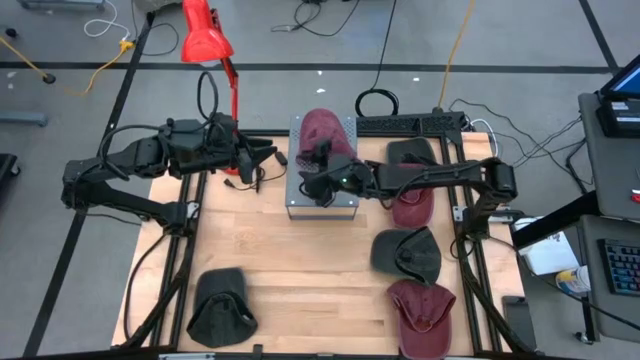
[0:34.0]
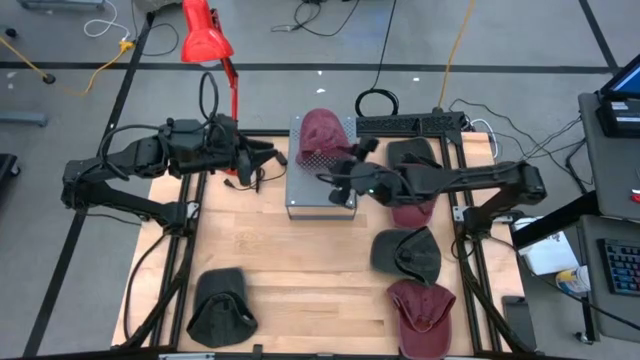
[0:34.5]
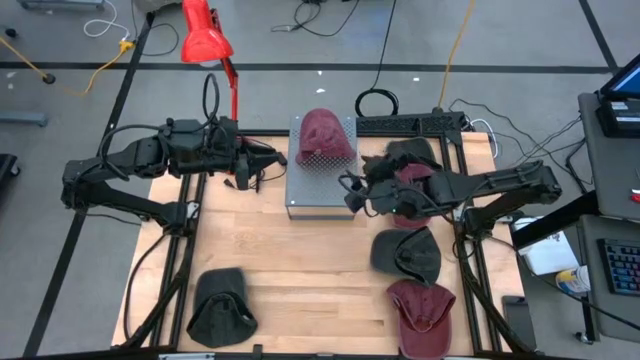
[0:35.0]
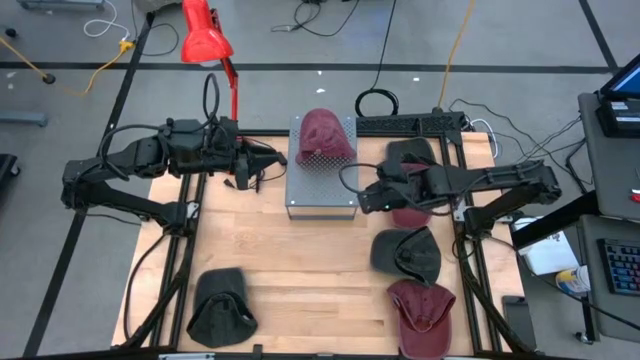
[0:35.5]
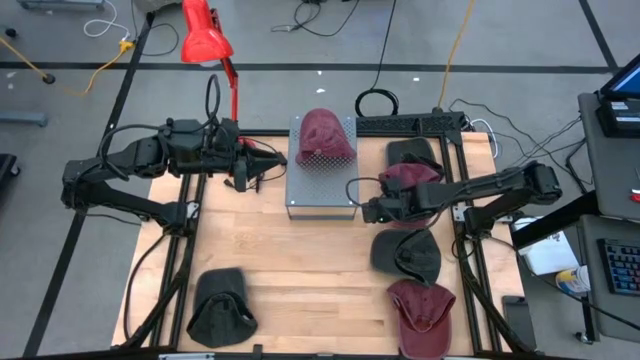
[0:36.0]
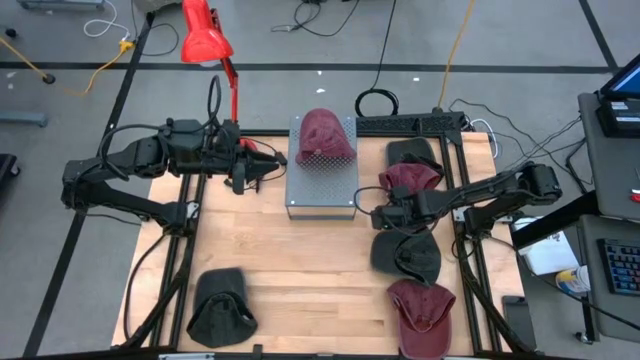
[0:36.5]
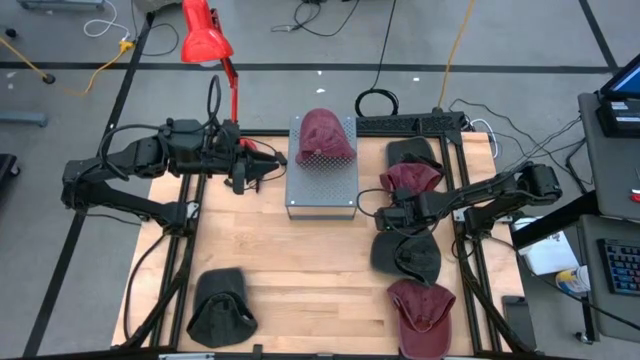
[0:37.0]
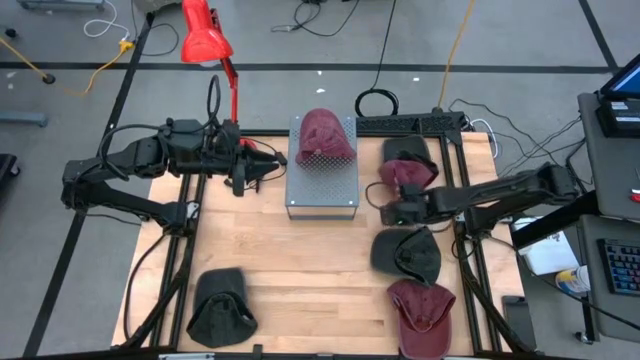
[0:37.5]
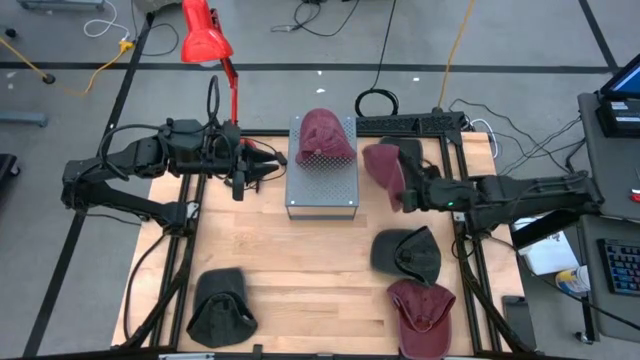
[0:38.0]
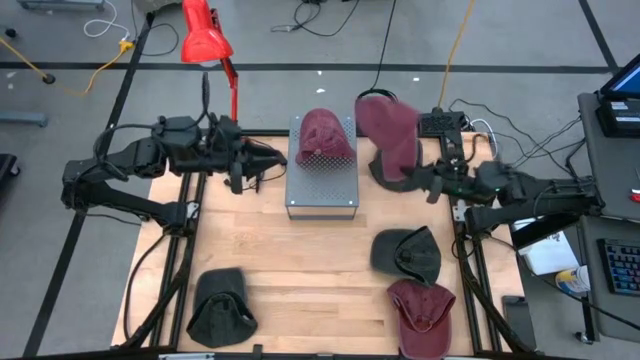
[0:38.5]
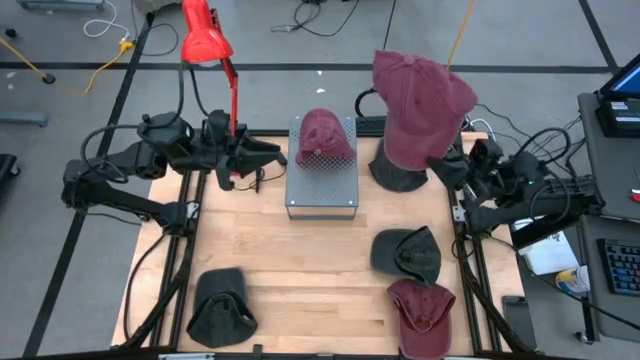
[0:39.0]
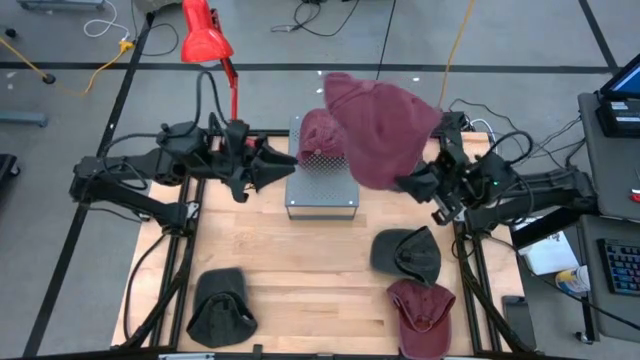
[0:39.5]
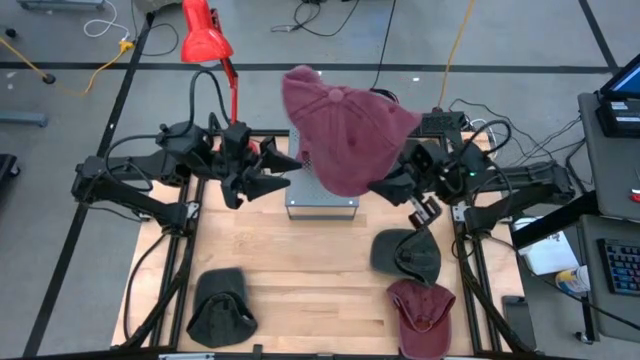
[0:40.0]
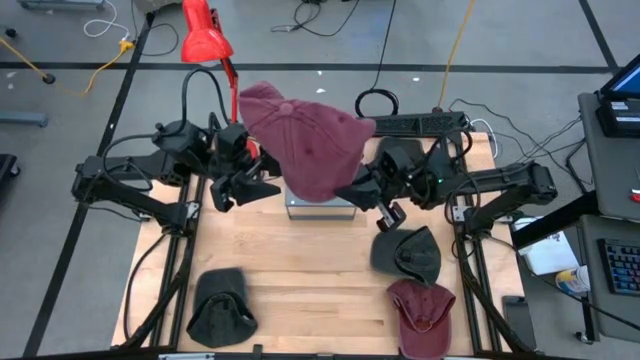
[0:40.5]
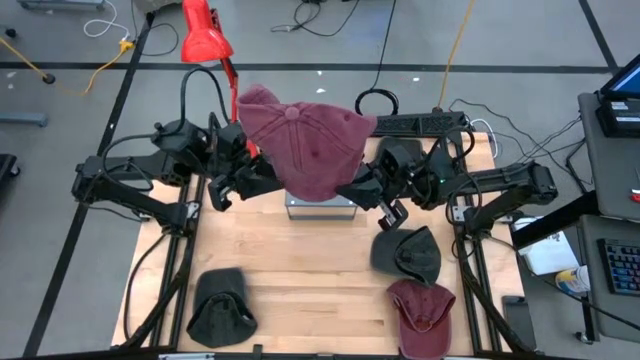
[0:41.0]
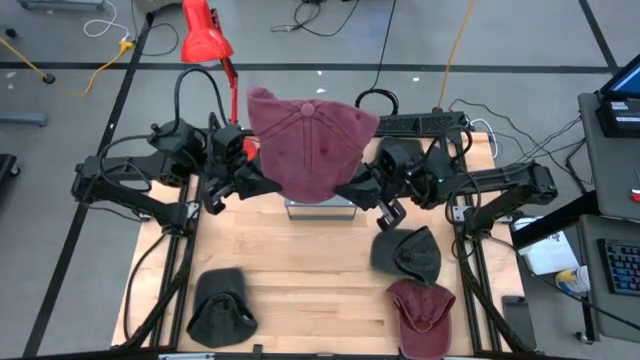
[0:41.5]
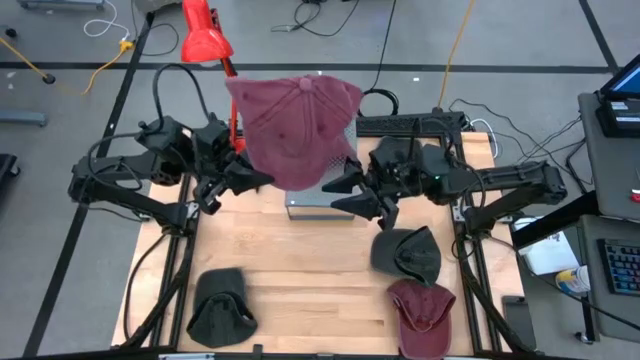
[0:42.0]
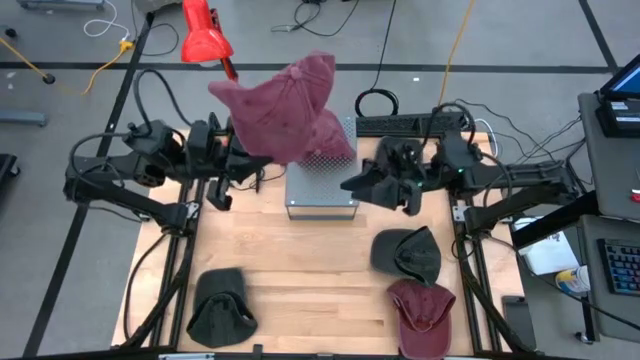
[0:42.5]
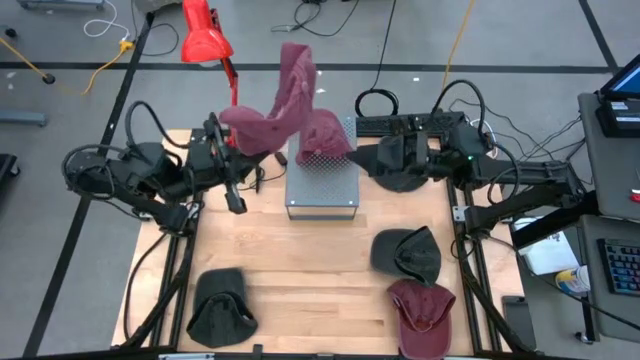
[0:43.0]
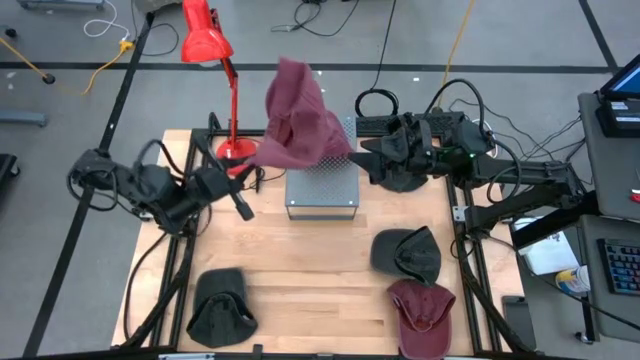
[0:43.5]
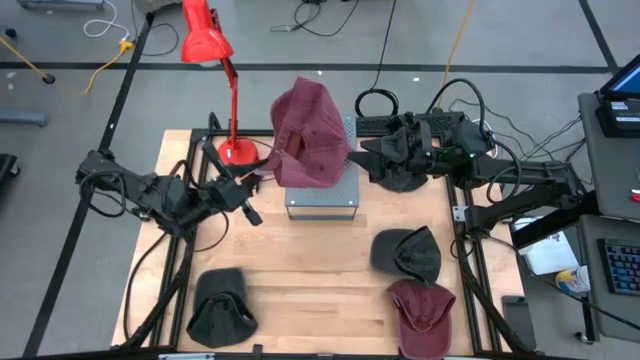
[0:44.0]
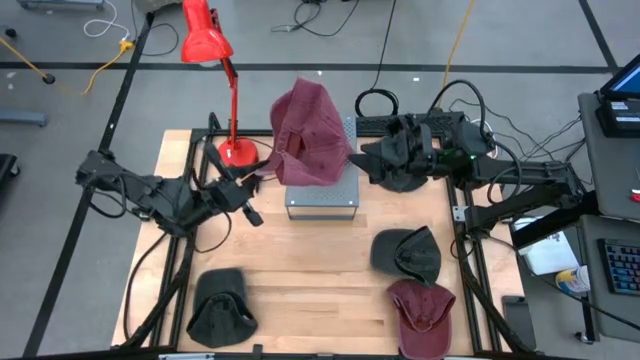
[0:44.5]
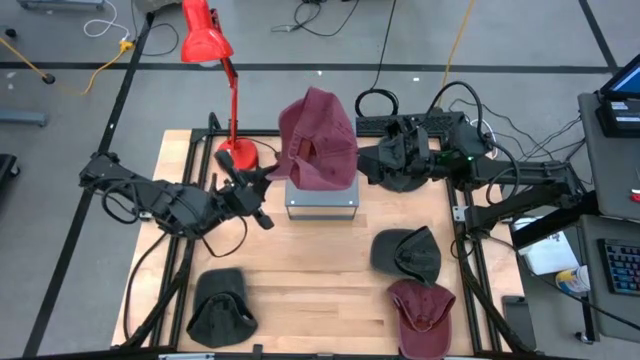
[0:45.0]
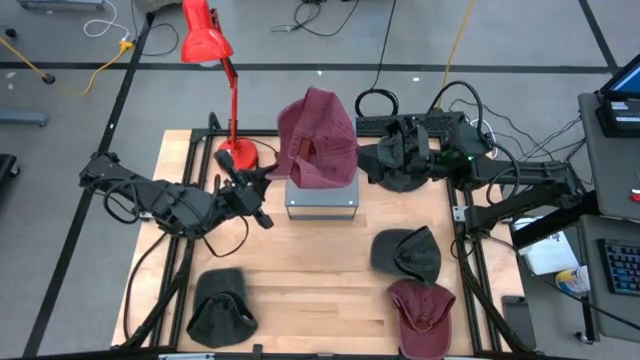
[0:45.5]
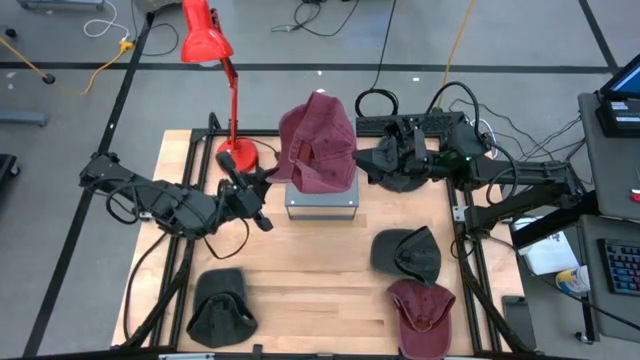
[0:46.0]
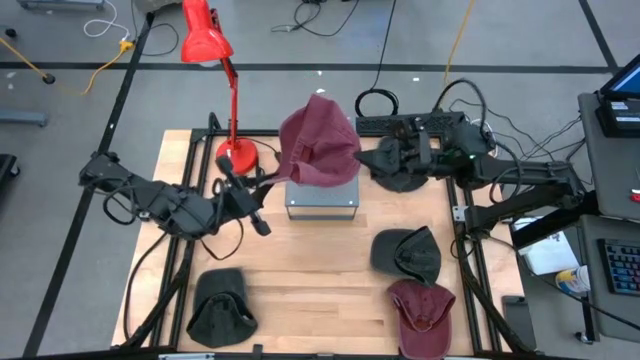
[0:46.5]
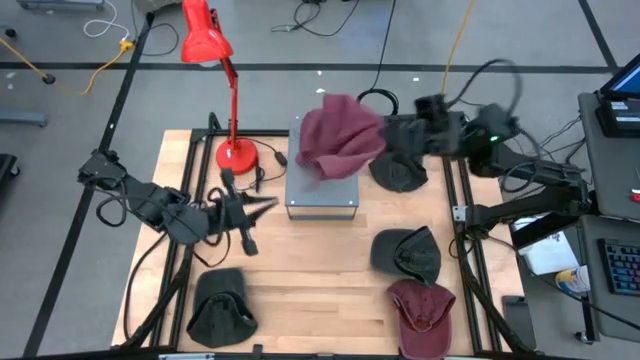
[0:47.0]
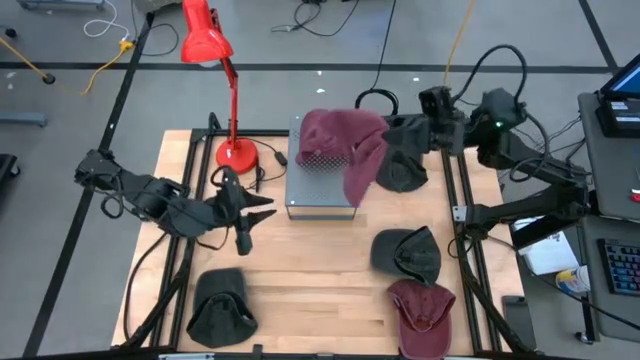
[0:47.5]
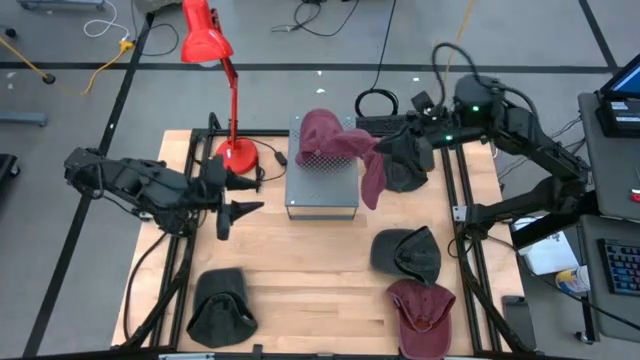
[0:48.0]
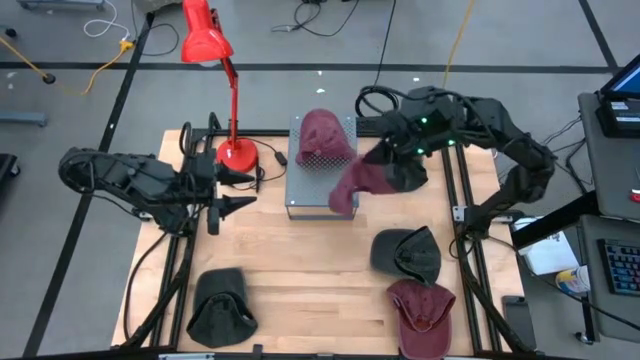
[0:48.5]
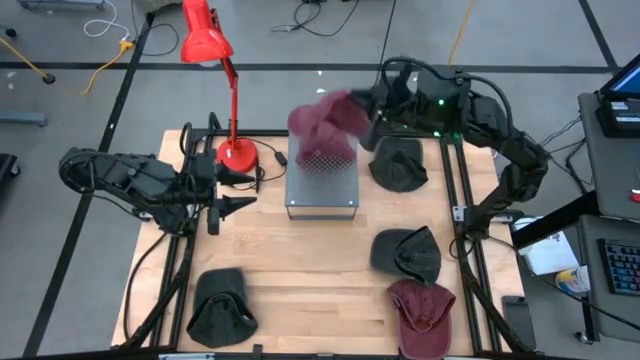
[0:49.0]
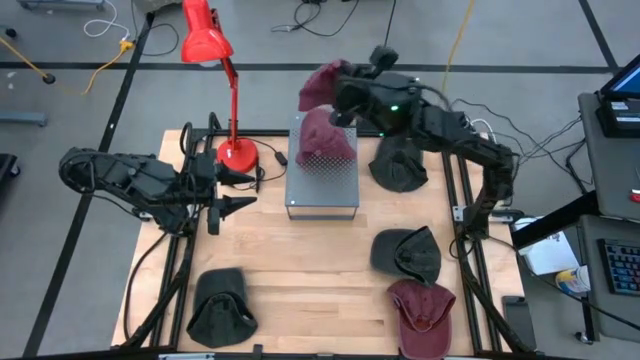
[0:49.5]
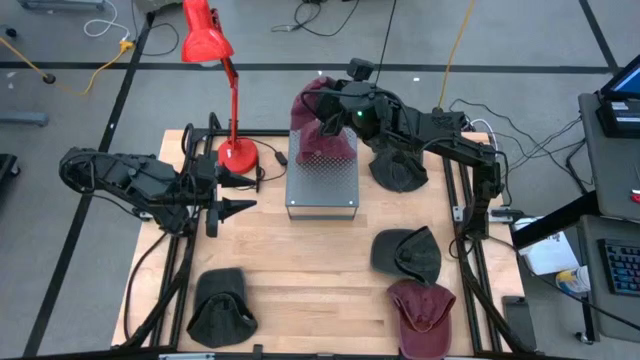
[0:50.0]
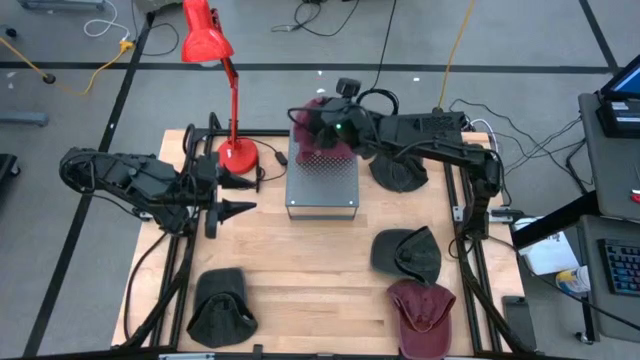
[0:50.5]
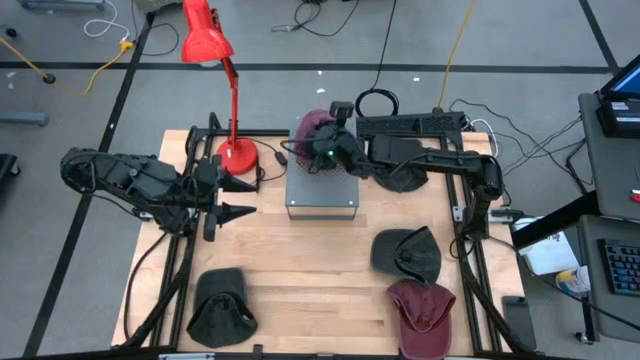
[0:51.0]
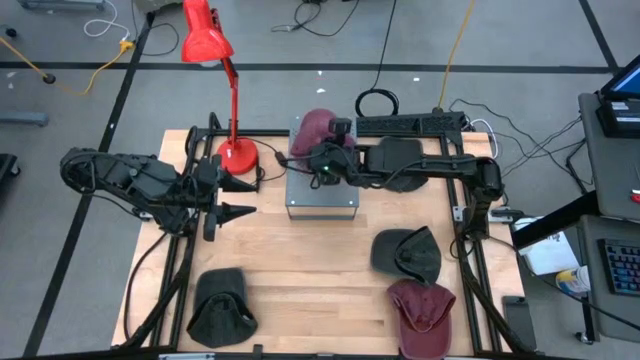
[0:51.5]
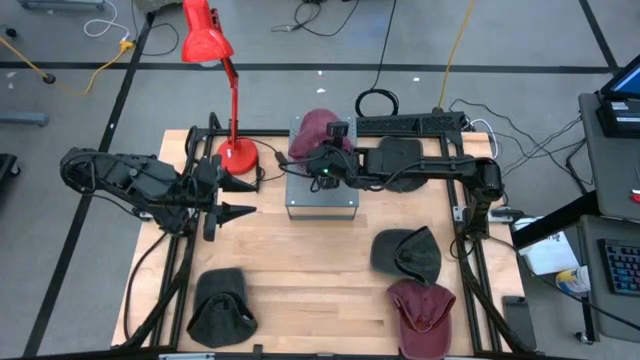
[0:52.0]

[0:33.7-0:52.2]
Task: Pick & Place hat
Stack the top red cap on top of the red cap on the shelf
